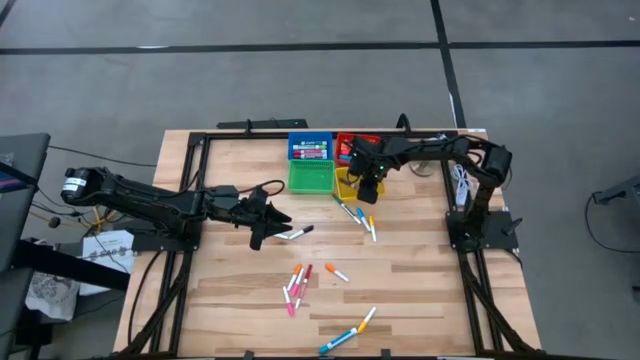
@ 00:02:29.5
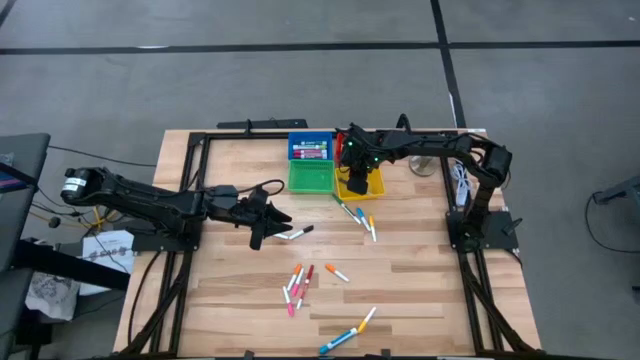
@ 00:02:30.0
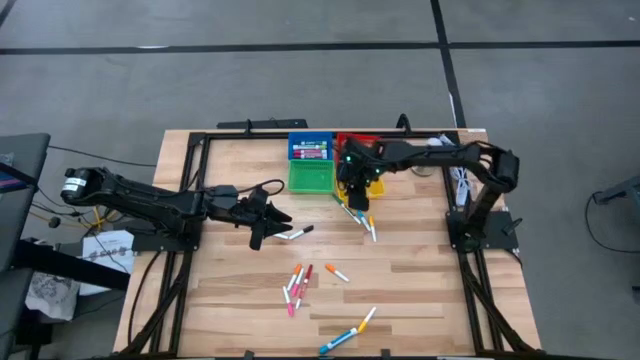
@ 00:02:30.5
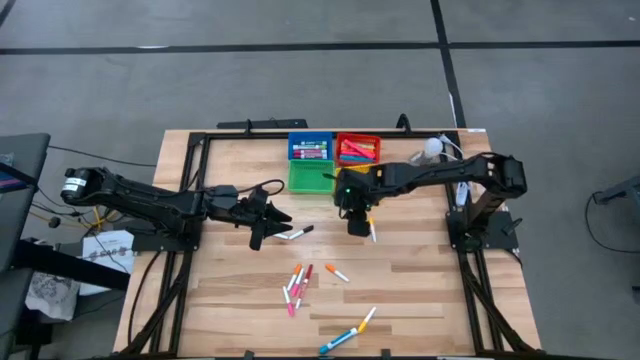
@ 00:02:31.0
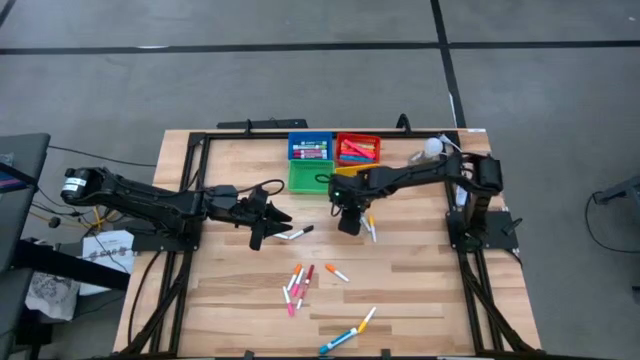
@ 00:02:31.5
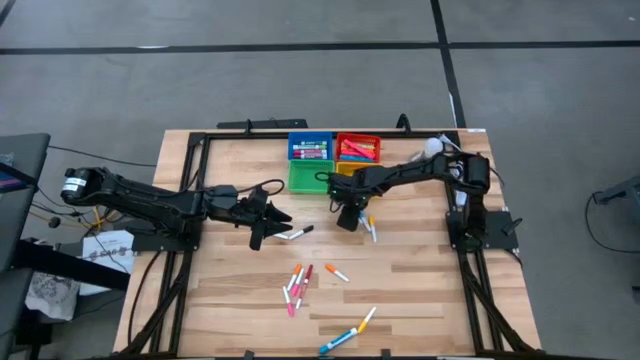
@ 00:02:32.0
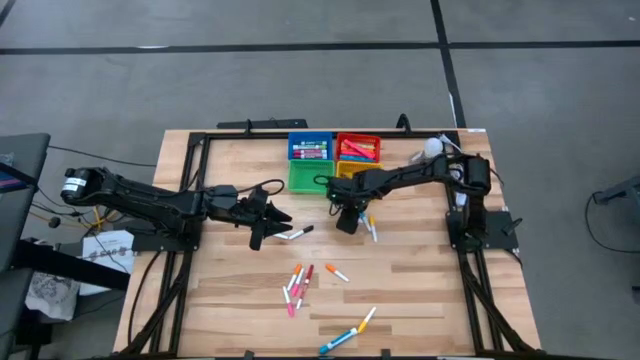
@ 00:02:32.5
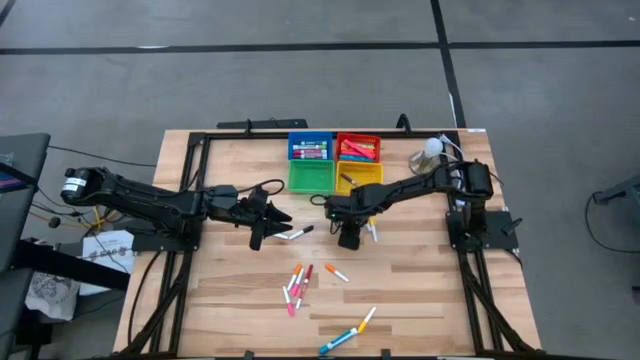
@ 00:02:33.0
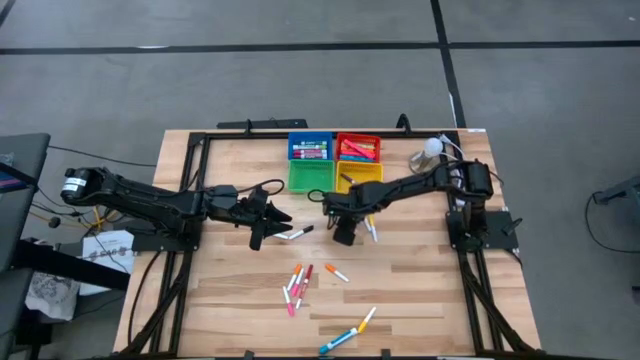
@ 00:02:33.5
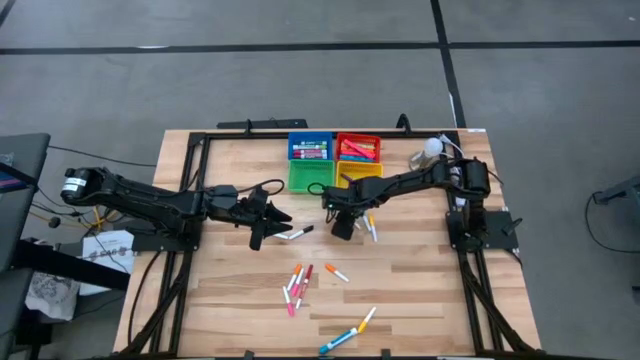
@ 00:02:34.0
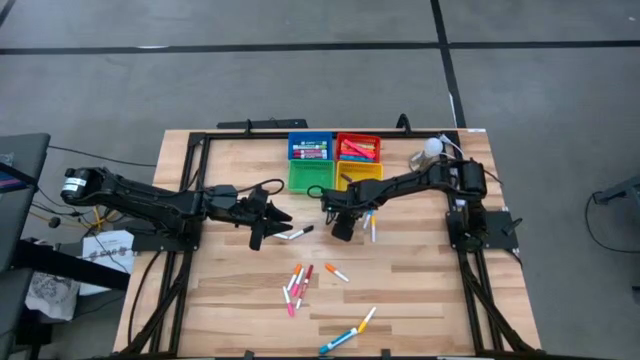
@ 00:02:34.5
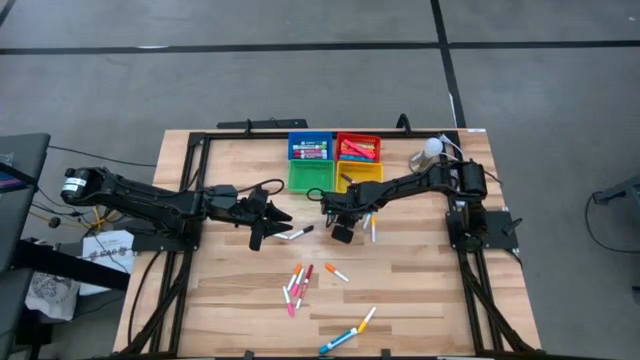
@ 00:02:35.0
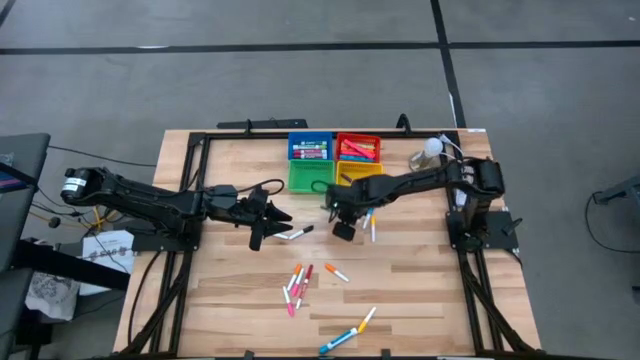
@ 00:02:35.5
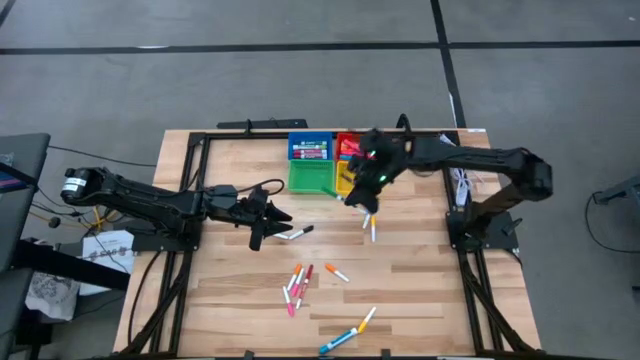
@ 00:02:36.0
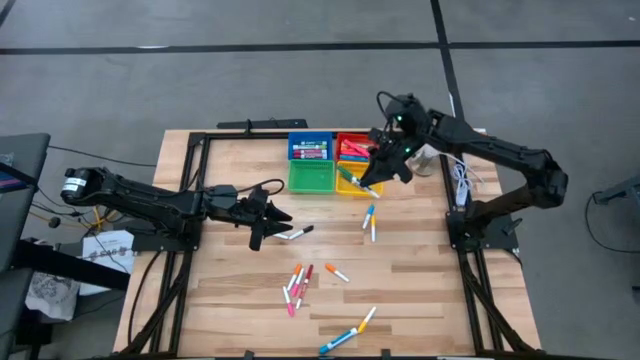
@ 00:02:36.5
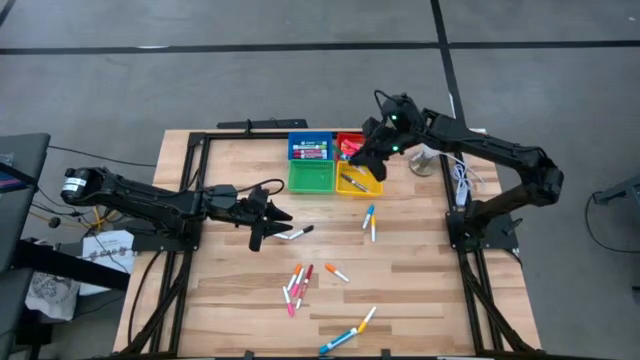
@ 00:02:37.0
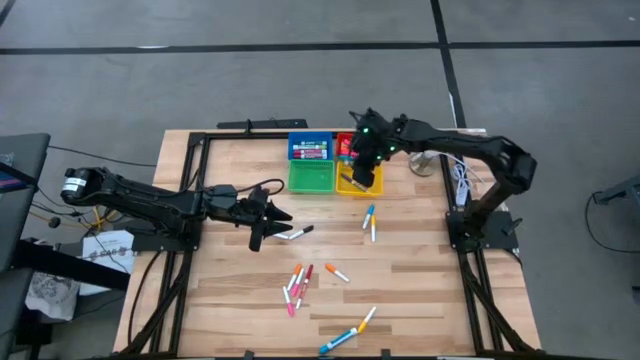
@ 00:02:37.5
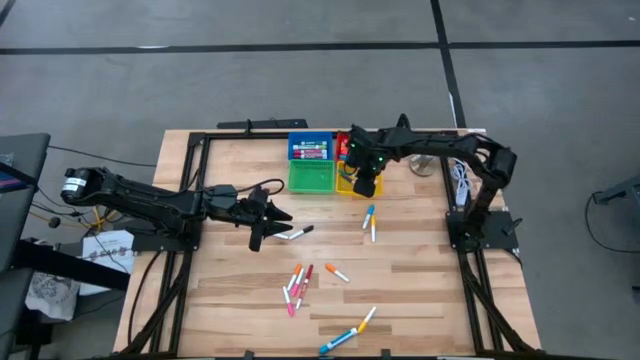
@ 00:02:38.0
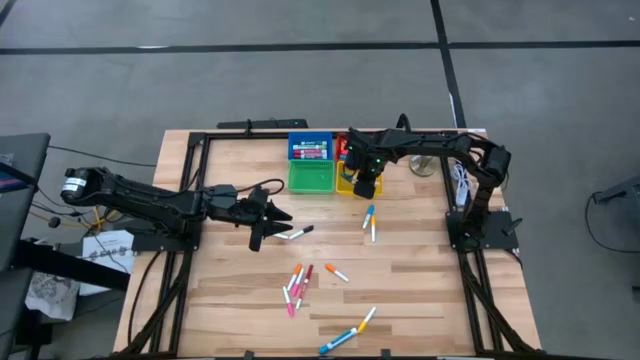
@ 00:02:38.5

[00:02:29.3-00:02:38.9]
Task: Pick & Place Markers
Put the dark green highlighter in the yellow bin

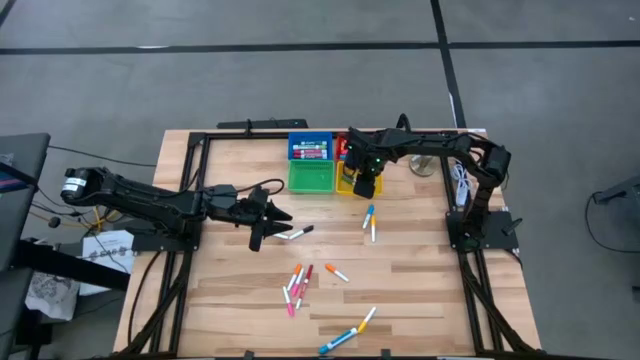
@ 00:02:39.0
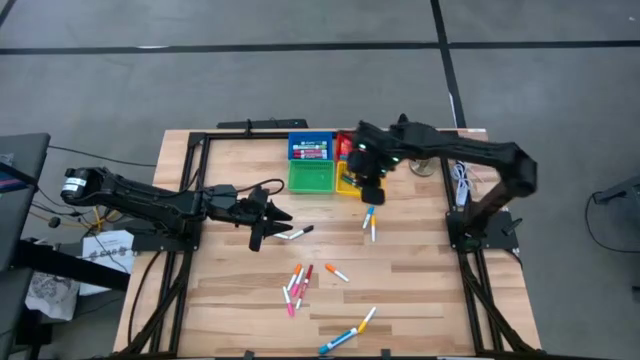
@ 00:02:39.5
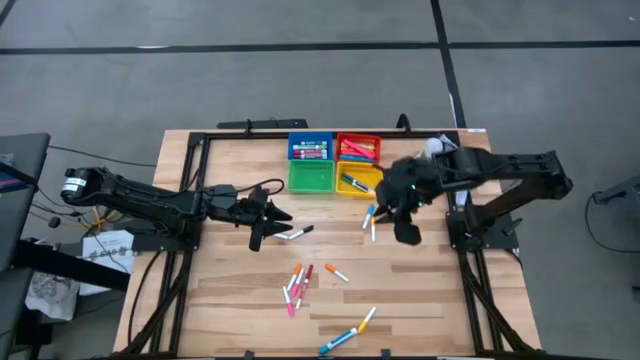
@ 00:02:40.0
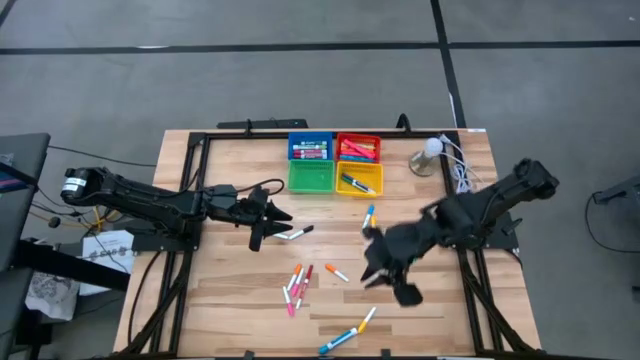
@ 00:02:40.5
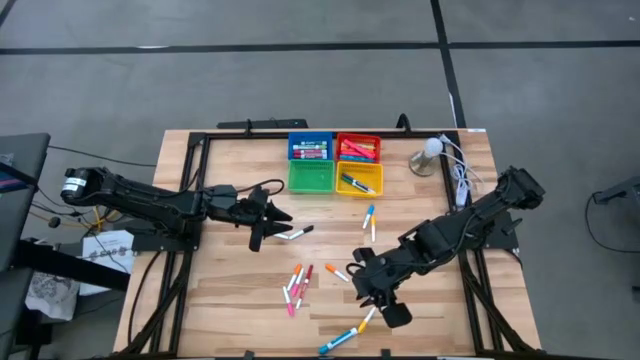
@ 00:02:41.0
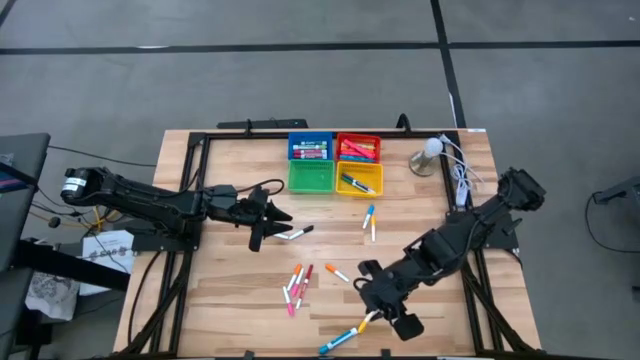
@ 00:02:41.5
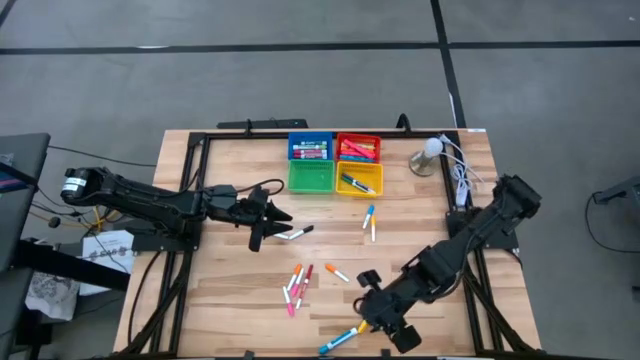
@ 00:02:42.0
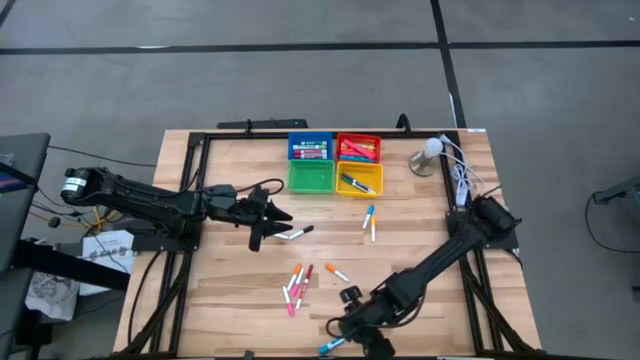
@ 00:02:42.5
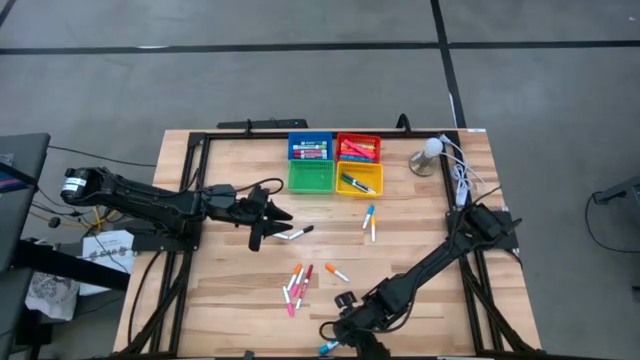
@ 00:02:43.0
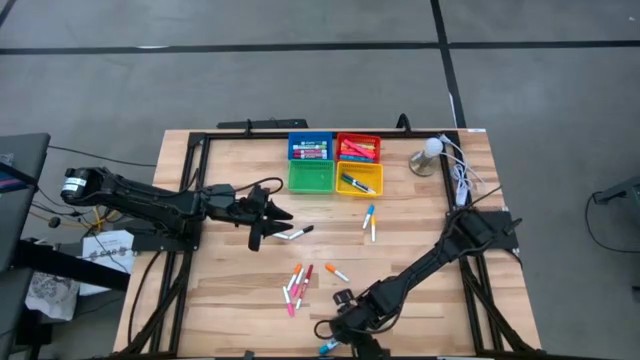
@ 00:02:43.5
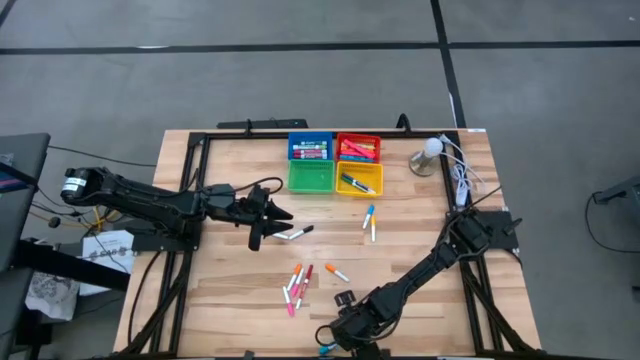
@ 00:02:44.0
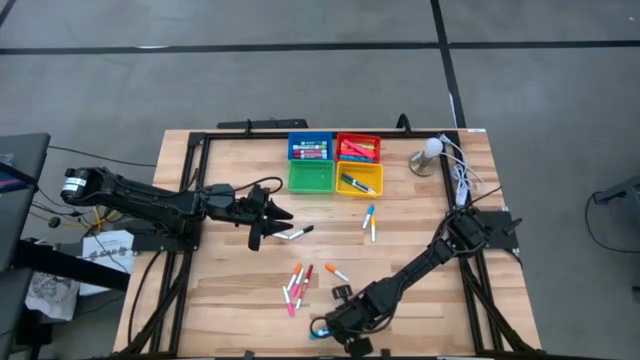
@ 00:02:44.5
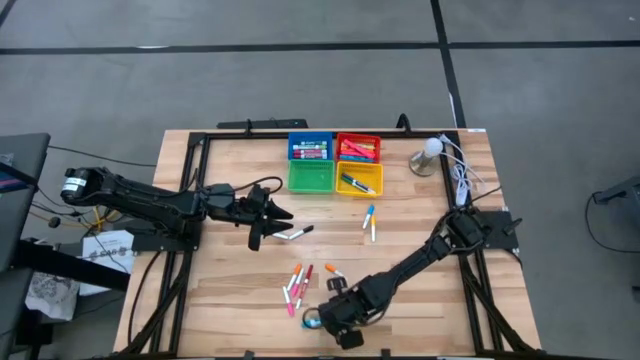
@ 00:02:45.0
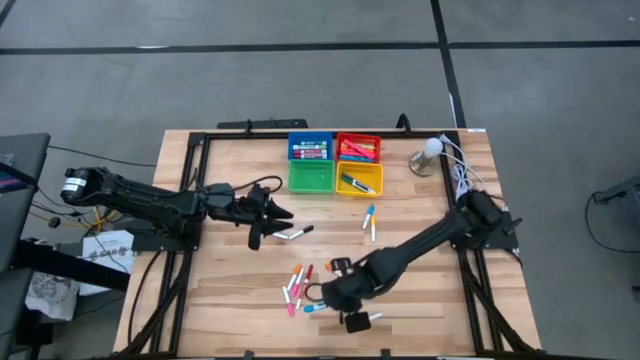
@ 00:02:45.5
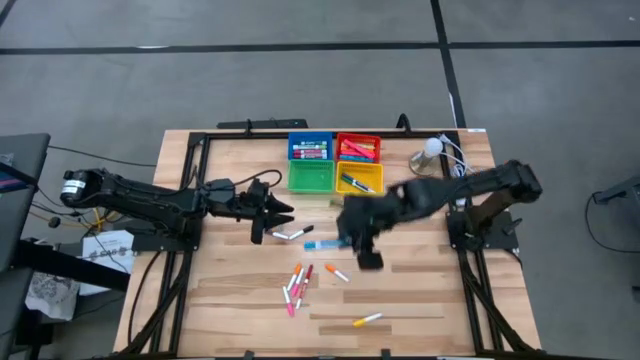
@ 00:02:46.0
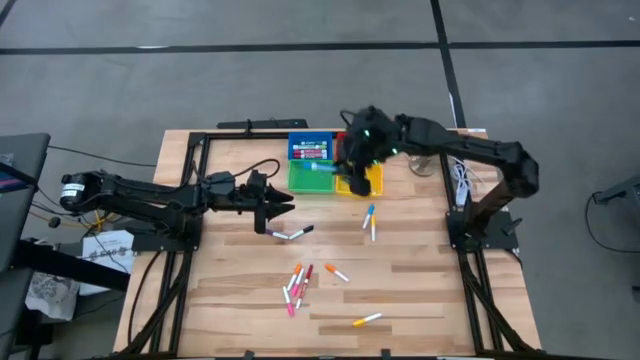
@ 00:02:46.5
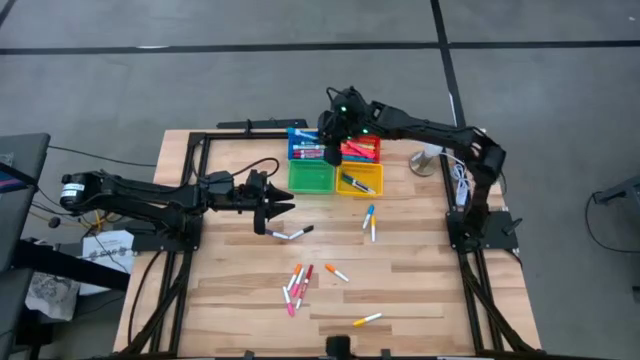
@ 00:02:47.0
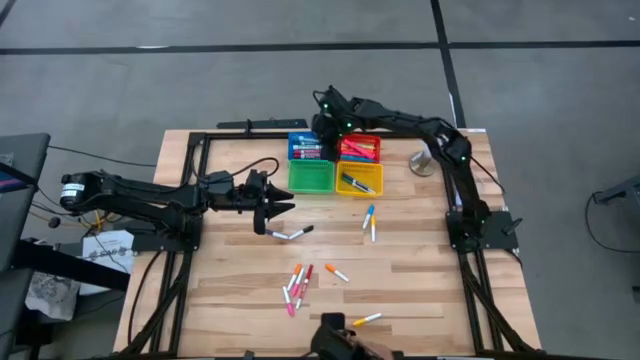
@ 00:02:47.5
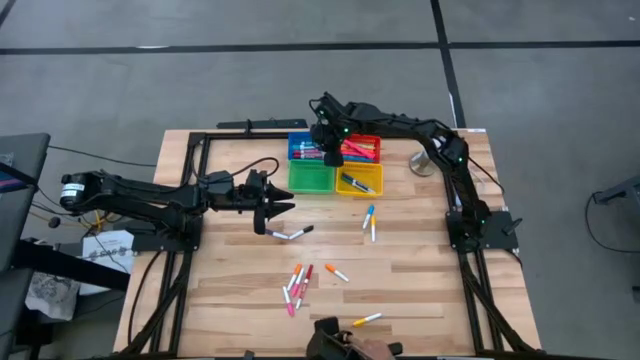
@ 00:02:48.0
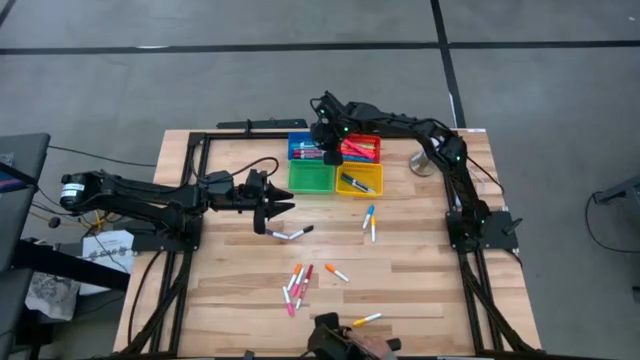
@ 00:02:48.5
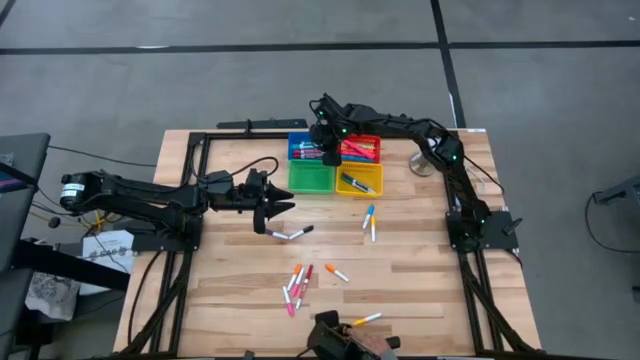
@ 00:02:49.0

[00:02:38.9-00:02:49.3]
Put the light blue highlighter in the blue bin
